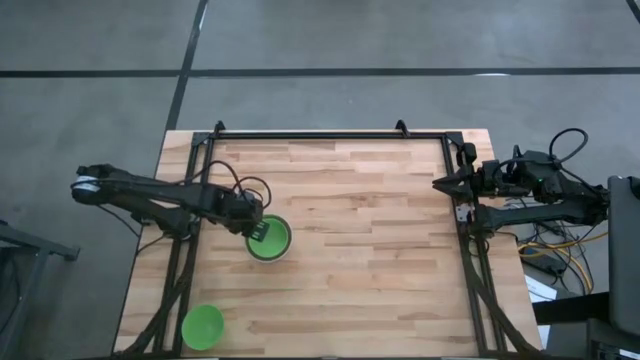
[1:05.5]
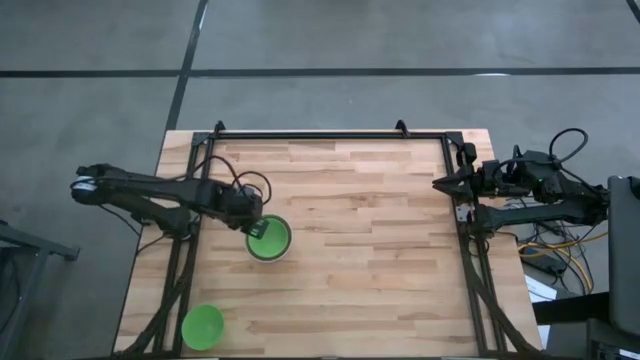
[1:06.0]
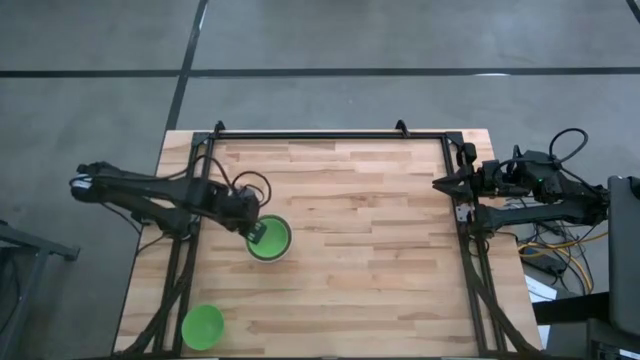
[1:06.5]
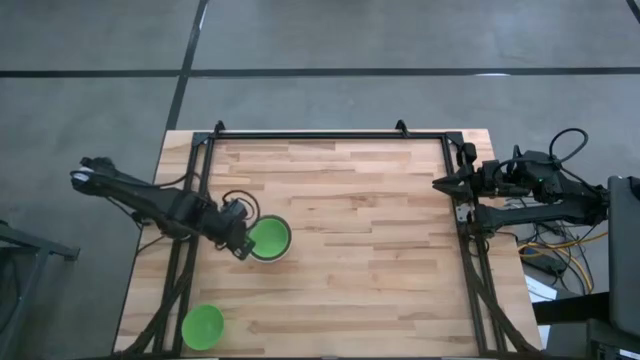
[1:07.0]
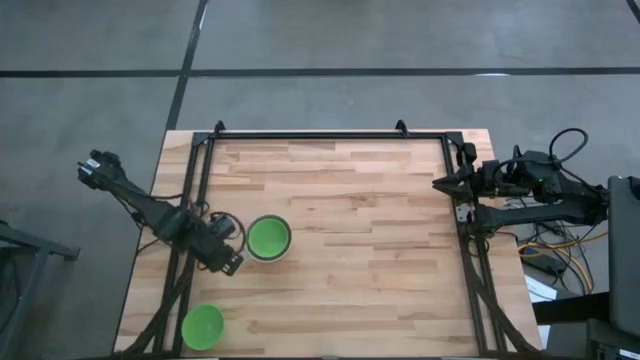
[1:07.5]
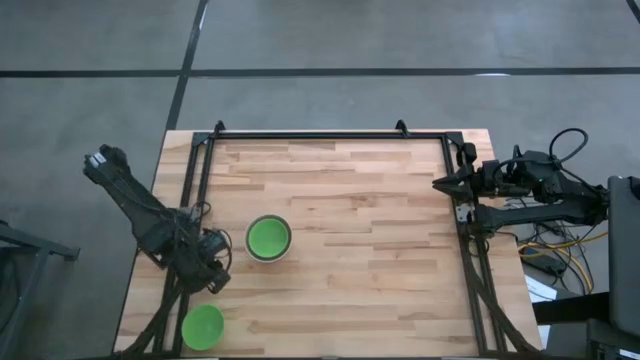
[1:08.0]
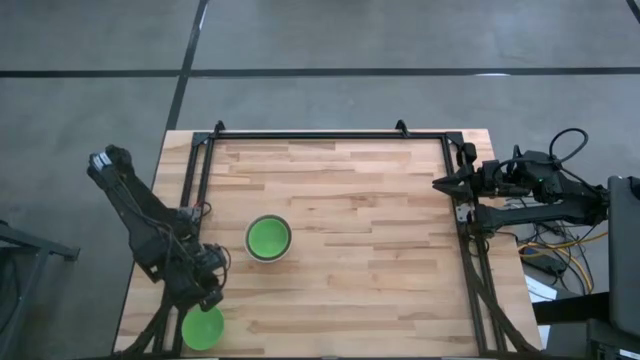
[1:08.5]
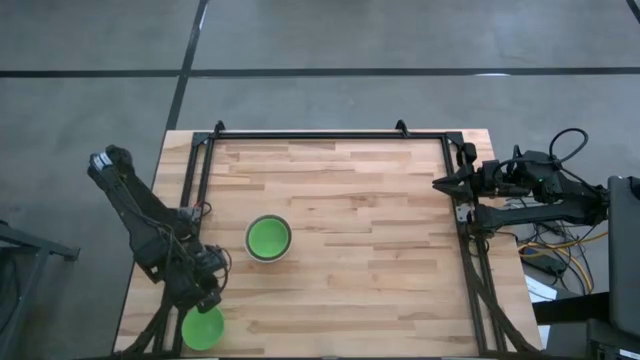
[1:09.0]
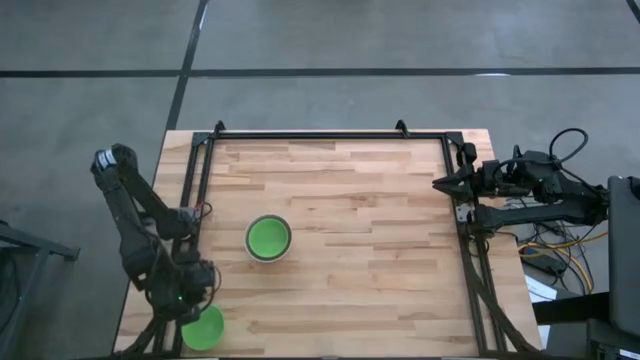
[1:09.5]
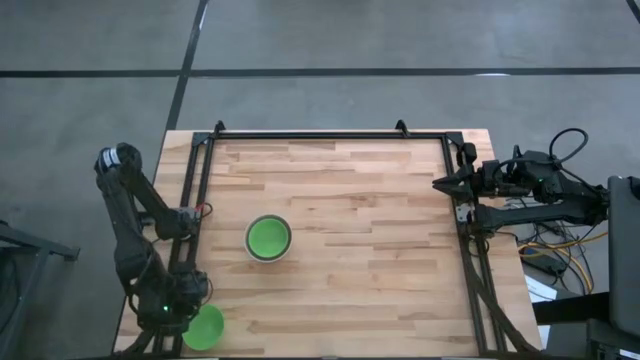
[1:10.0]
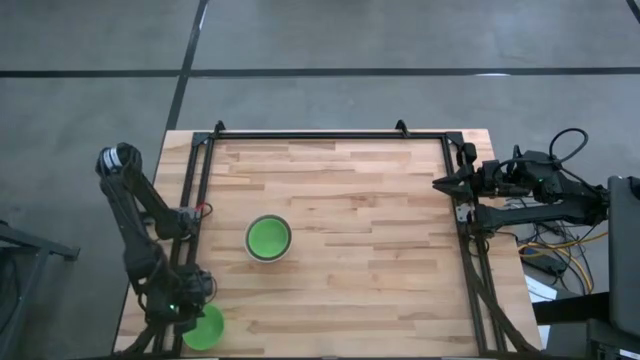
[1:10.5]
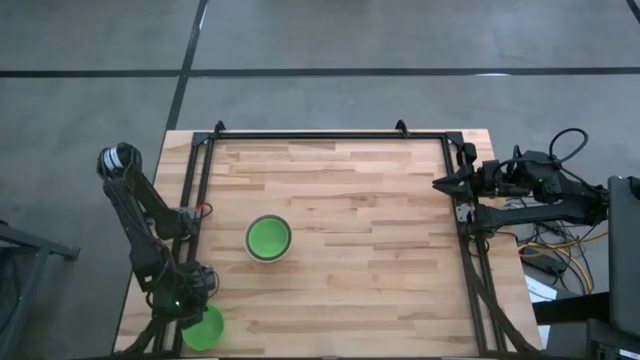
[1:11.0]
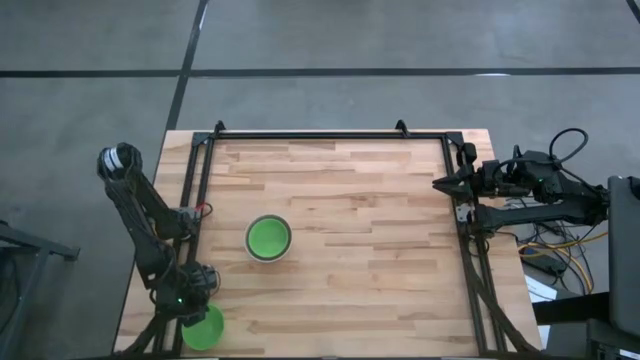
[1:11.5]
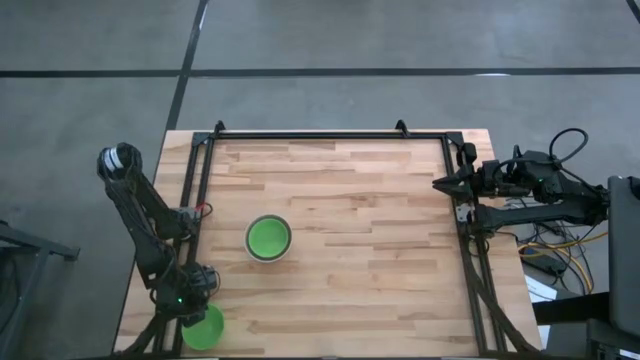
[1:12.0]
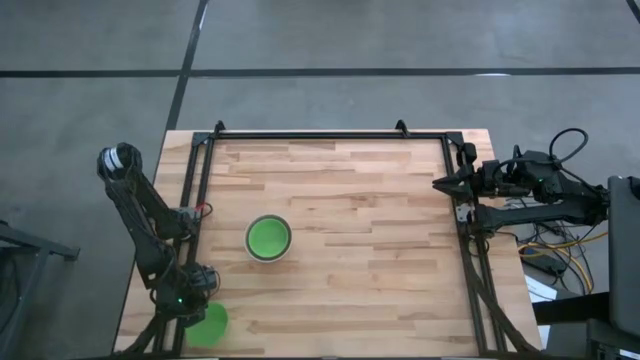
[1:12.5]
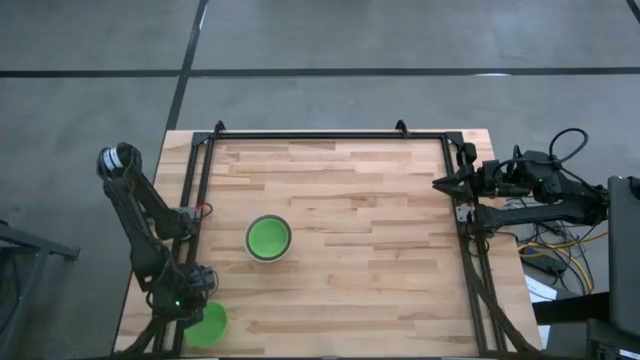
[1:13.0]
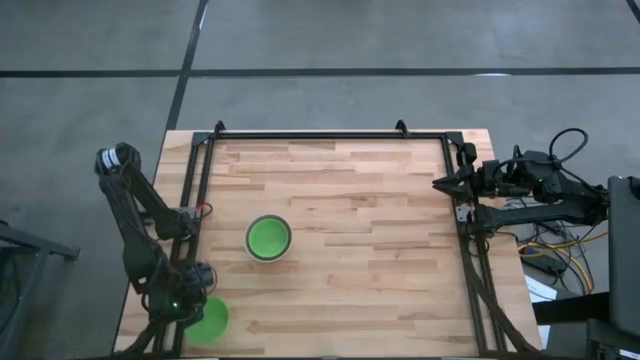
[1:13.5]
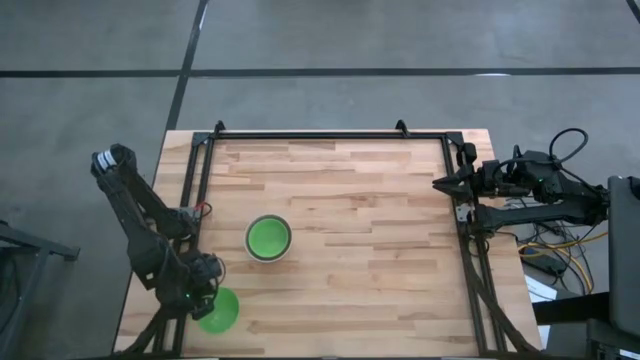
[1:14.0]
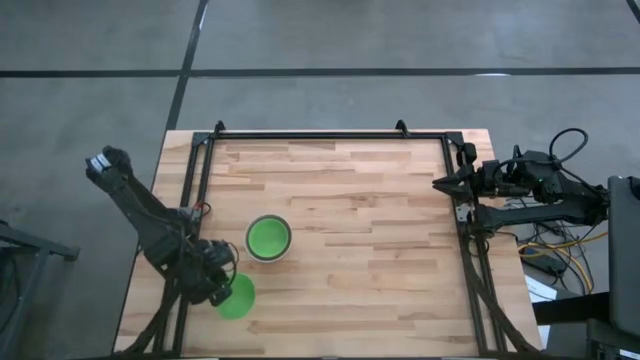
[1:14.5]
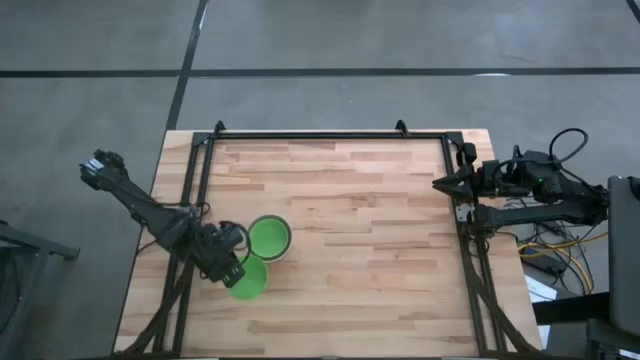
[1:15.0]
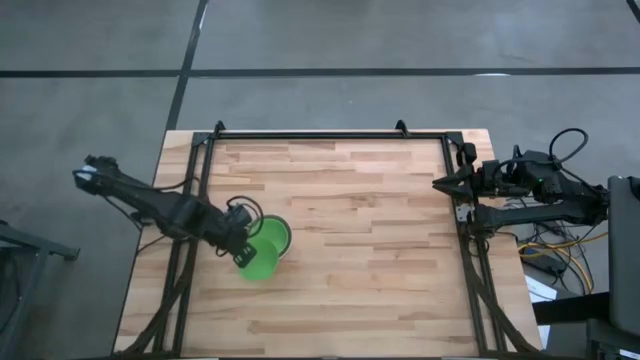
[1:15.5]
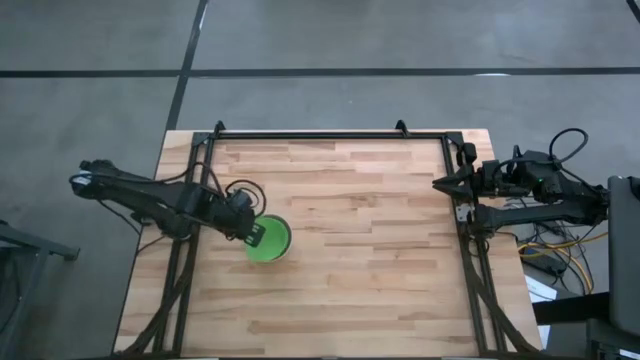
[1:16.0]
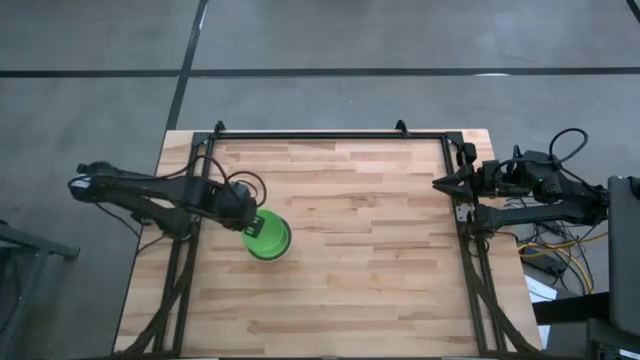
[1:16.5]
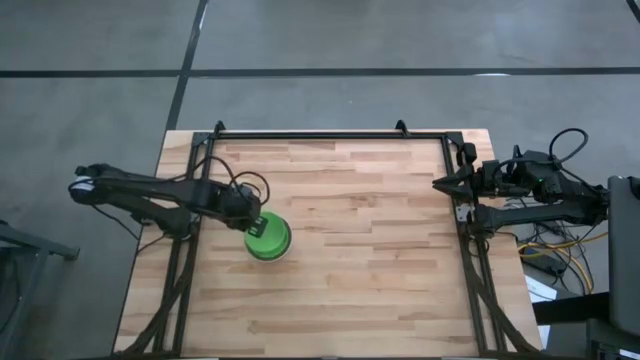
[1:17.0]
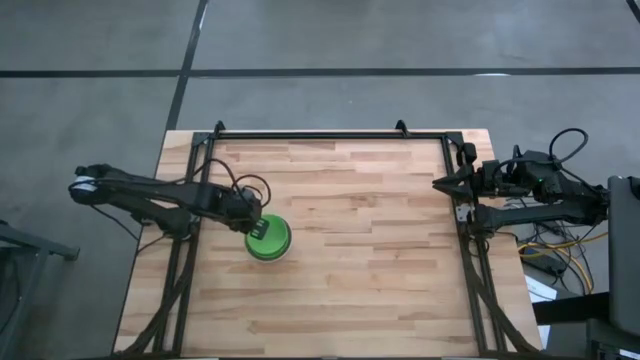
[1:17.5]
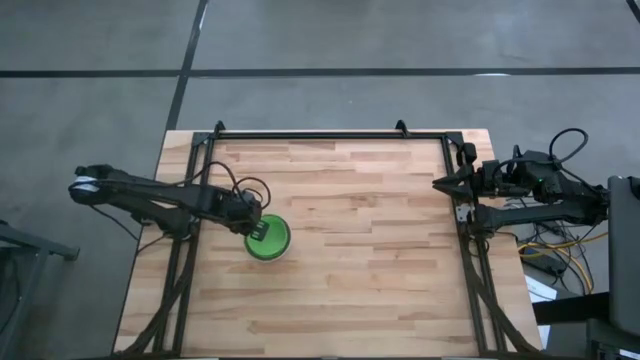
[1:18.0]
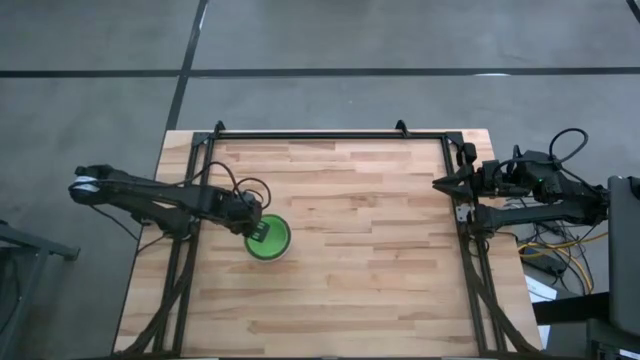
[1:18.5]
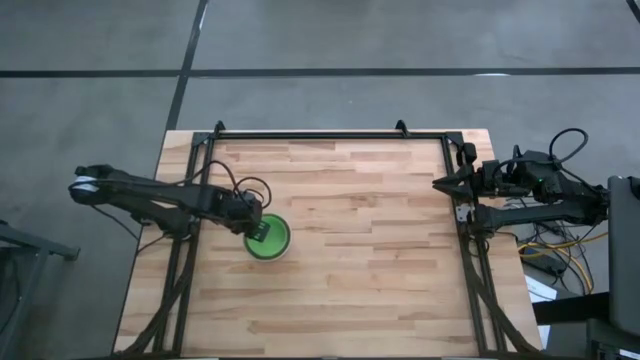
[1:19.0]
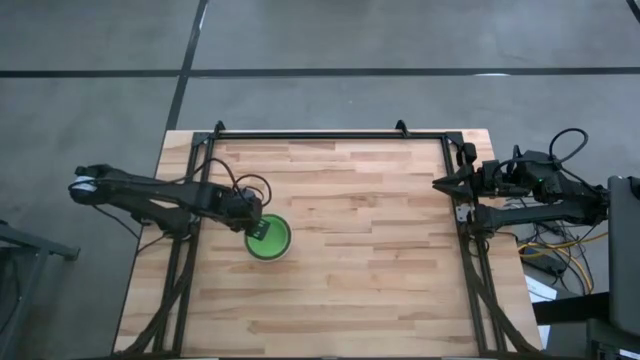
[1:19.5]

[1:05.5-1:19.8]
Stack the green bowl on top of the green bowl
